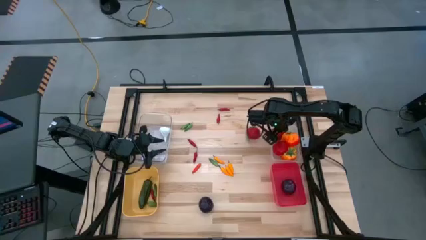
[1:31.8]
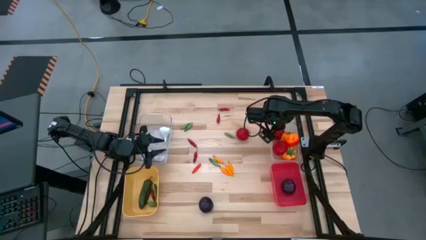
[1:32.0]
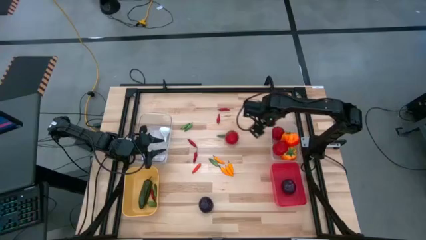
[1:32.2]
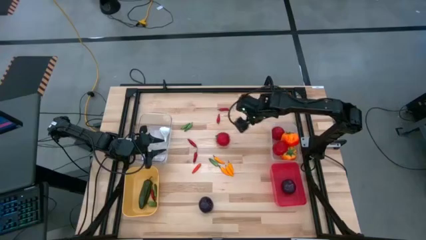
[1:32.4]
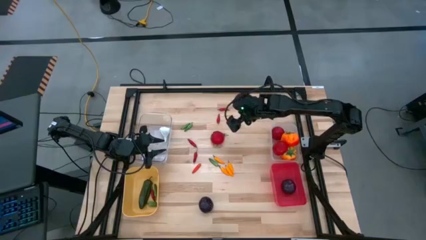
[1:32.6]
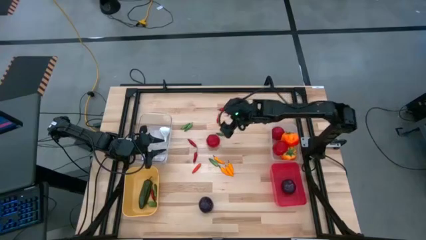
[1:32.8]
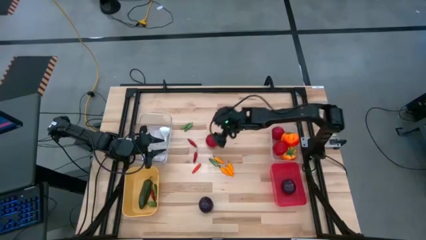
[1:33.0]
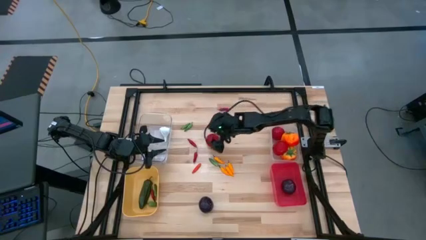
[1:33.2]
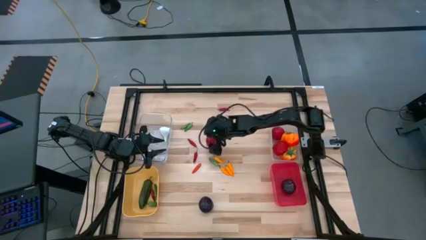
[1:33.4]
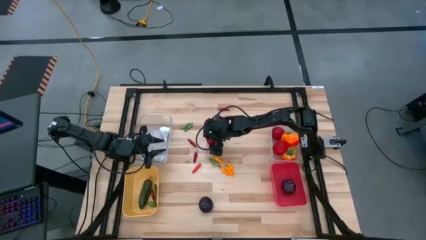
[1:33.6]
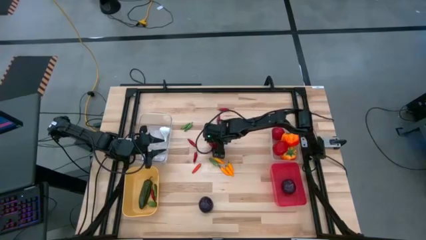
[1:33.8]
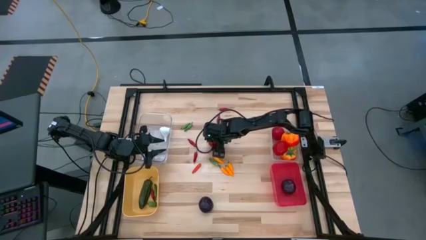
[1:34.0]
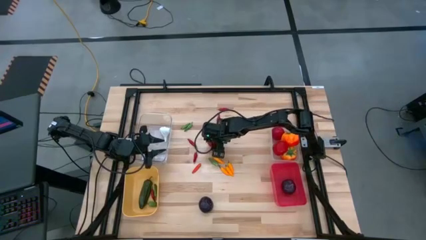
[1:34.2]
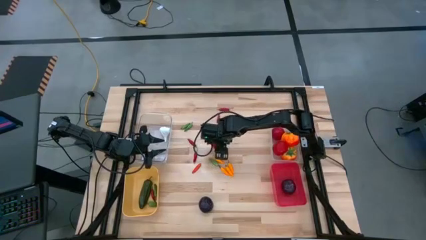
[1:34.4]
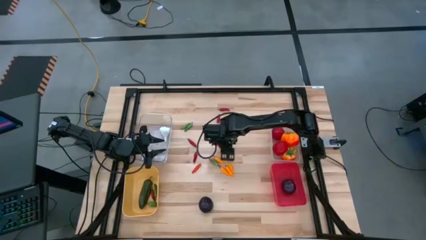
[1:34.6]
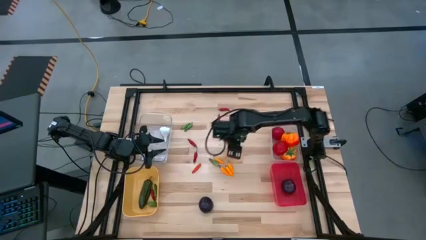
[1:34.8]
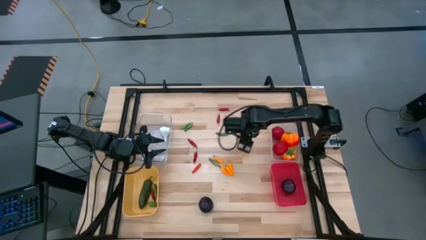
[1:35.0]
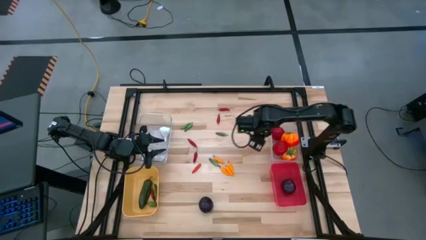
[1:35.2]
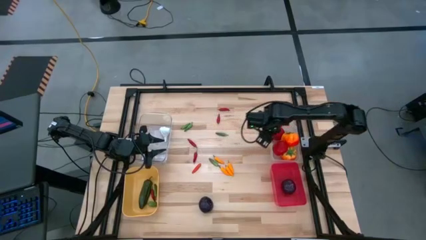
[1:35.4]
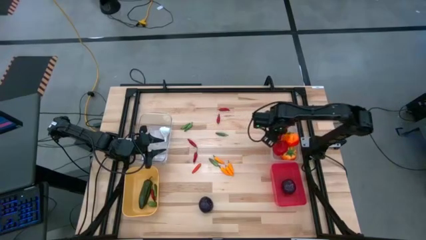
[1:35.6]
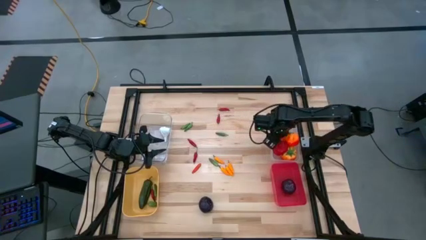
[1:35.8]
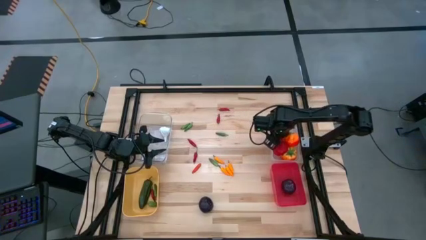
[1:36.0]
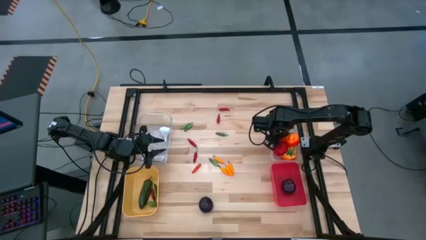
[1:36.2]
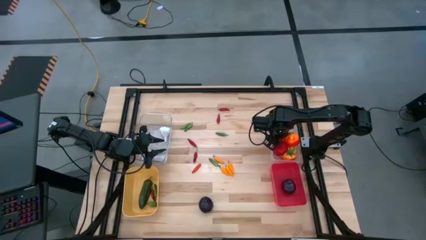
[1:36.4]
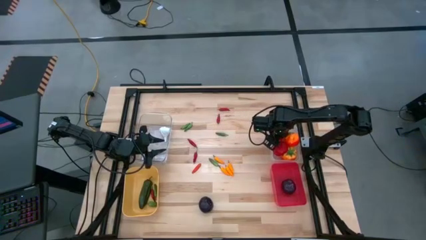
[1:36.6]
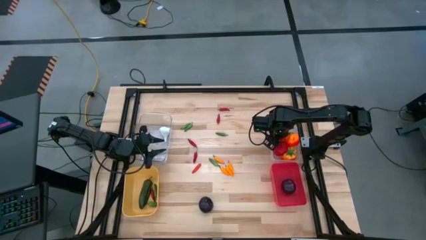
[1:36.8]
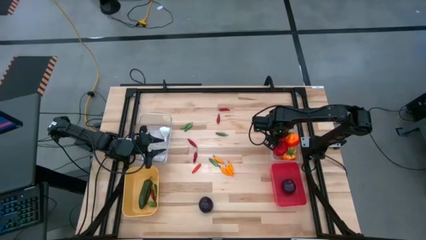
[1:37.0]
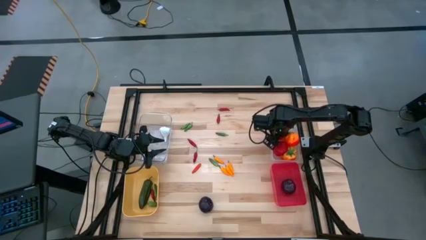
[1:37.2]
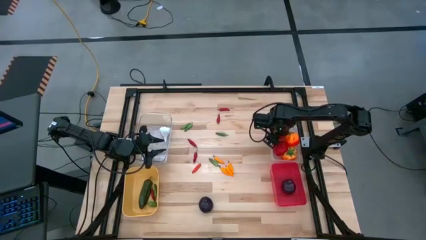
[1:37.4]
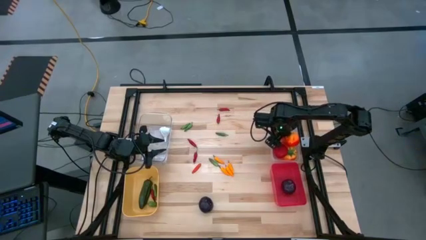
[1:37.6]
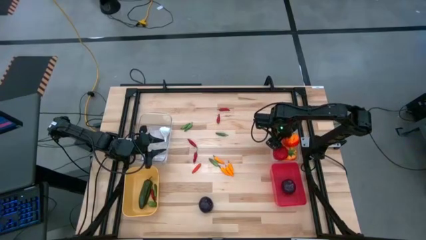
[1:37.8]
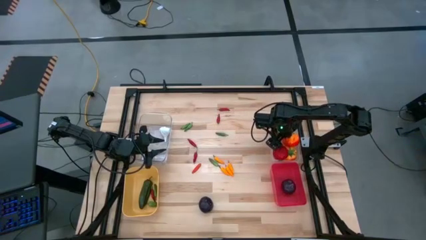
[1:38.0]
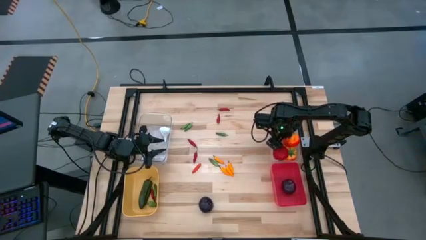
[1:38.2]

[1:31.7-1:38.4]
Task: Sort produce into baskets
Put the red tomato into the right transparent bin

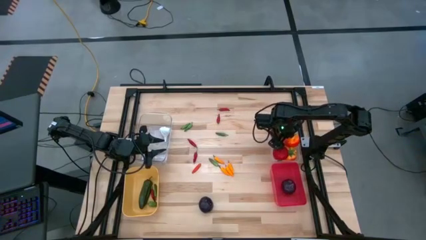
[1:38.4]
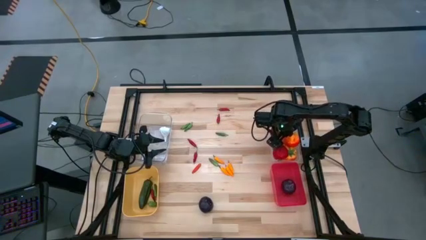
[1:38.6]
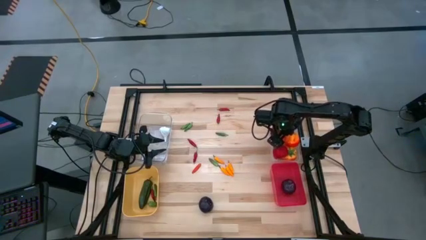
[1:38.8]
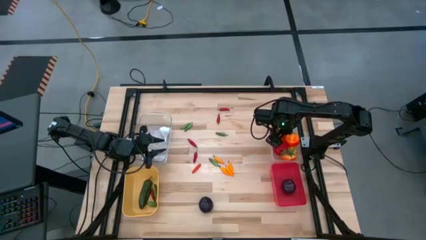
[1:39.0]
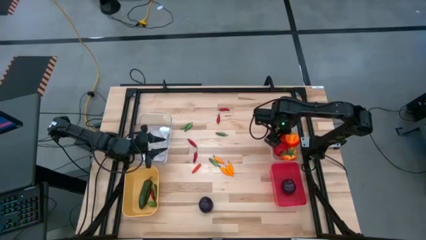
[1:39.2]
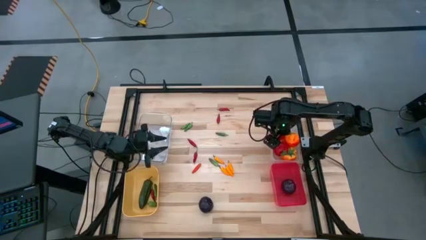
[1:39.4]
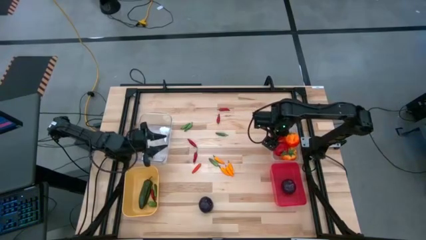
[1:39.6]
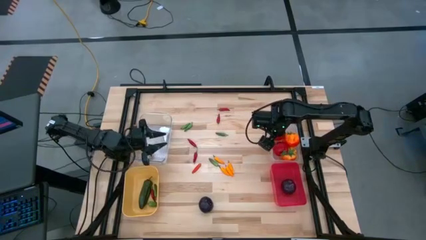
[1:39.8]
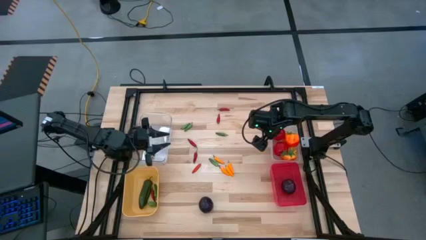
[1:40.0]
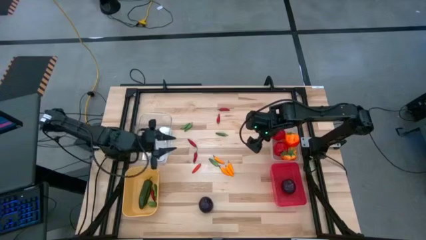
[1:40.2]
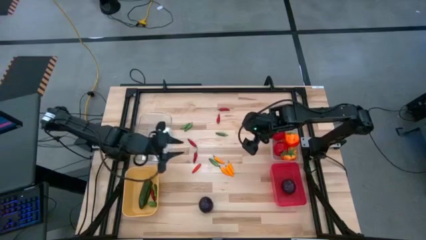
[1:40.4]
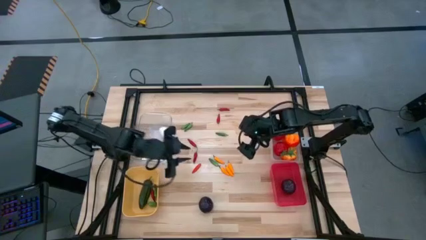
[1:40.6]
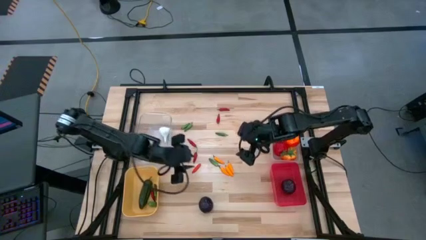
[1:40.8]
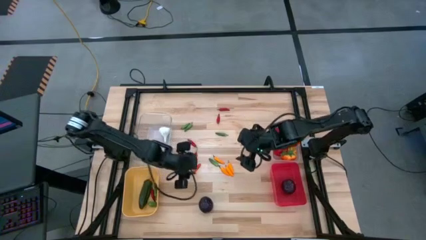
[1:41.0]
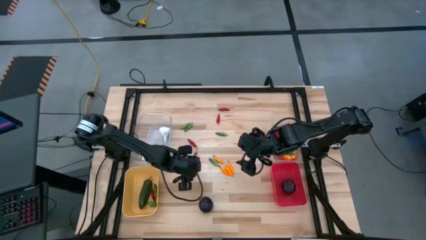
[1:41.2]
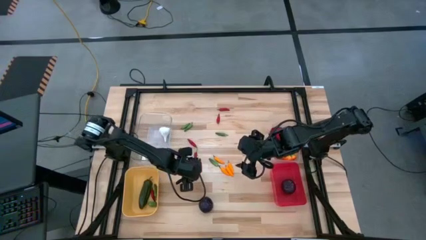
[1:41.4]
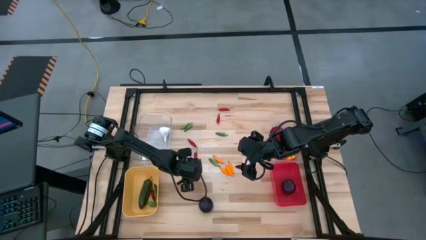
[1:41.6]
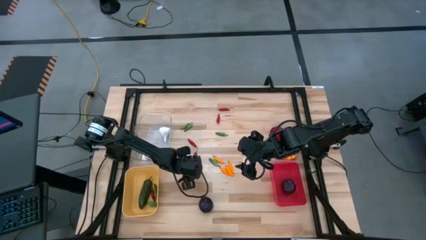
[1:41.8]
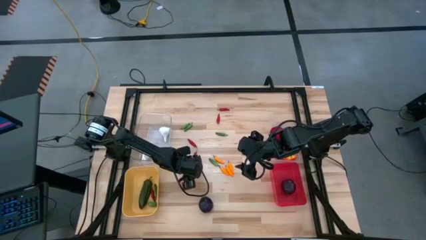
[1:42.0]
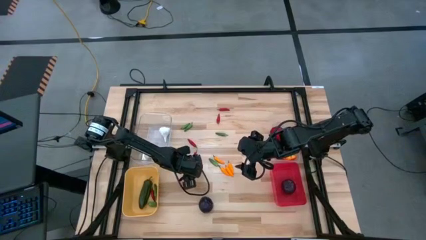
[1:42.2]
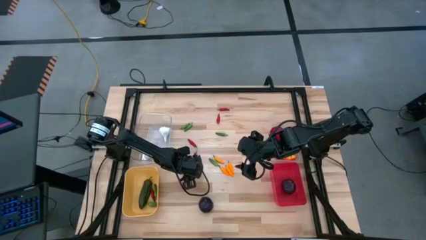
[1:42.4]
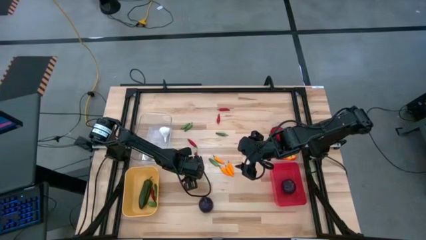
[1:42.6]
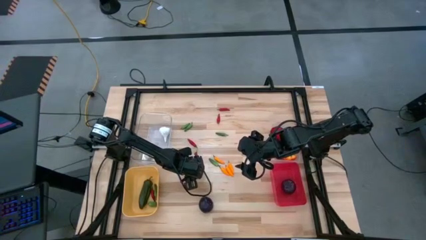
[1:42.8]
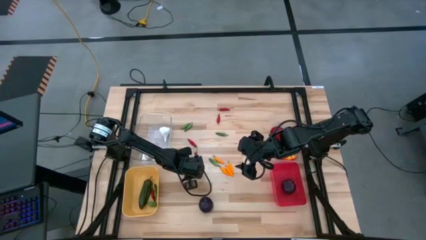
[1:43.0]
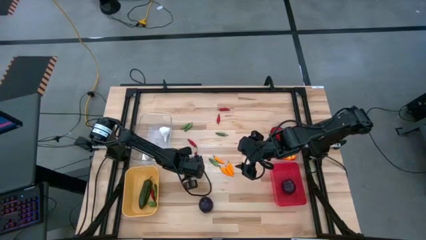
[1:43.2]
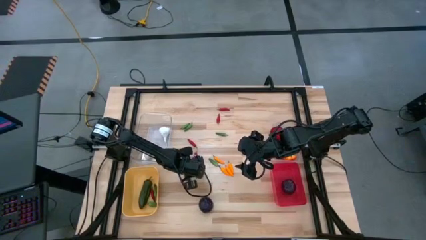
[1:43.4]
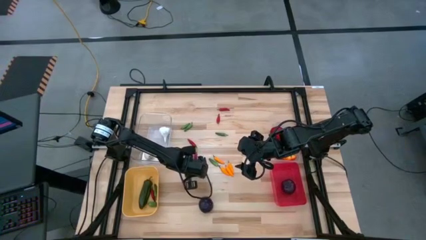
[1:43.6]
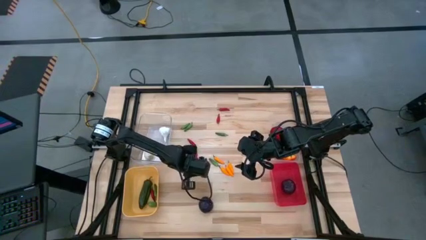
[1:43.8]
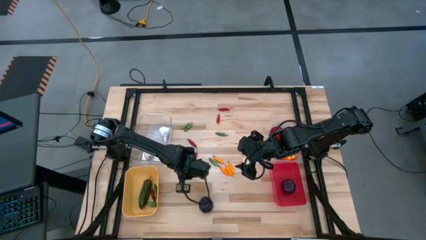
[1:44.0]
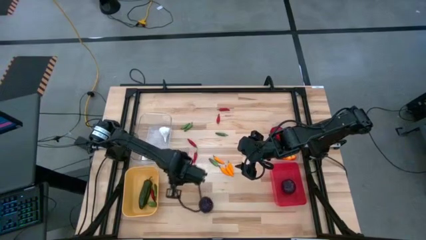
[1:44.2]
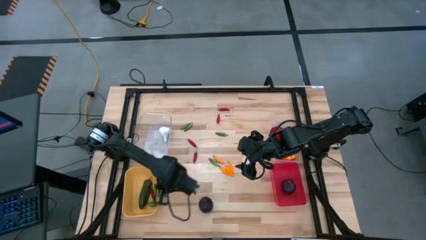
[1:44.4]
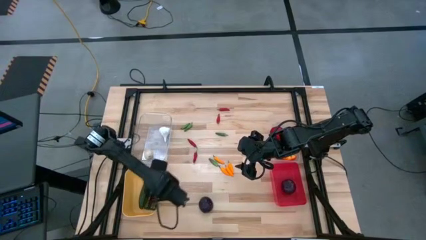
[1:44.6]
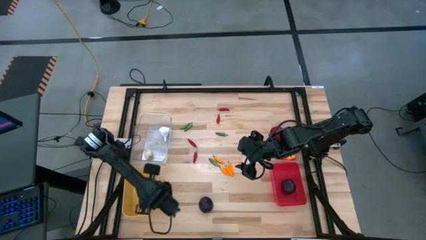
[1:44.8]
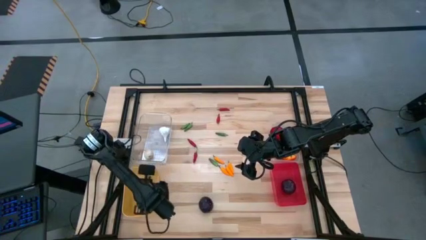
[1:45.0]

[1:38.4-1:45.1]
Put the orange chili pepper into the yellow bin

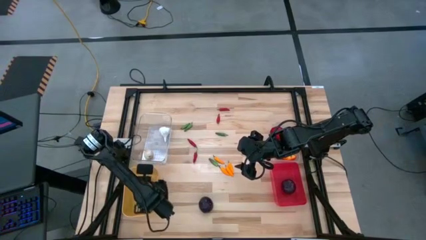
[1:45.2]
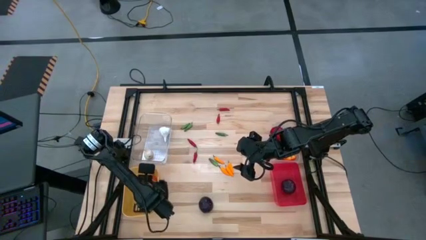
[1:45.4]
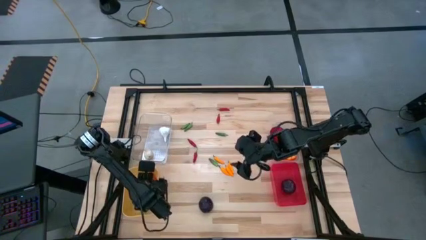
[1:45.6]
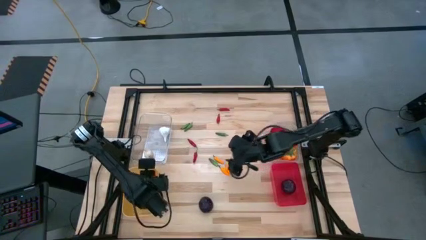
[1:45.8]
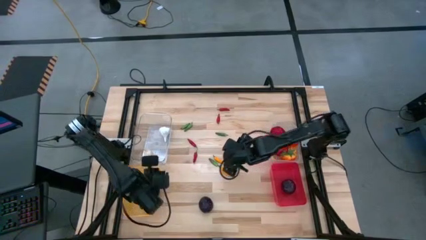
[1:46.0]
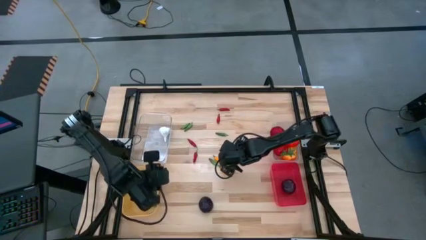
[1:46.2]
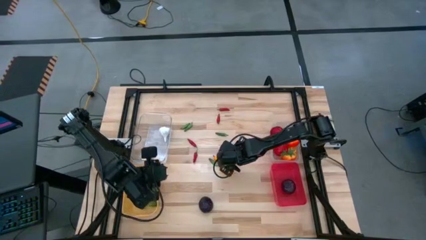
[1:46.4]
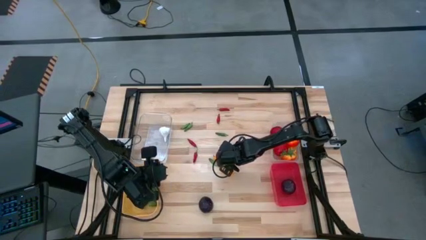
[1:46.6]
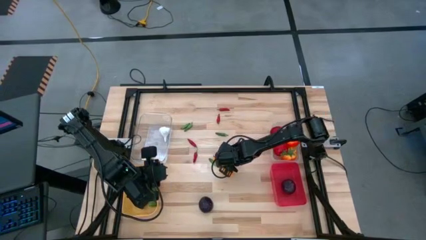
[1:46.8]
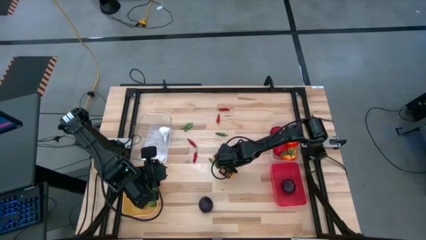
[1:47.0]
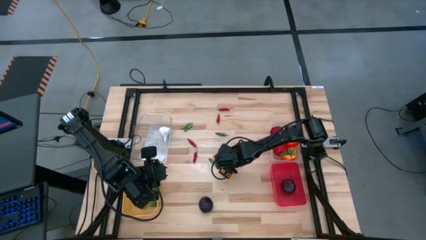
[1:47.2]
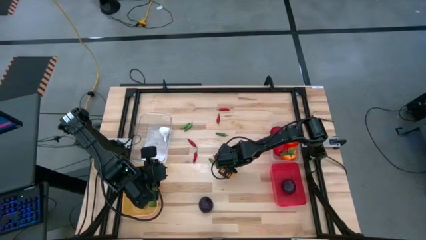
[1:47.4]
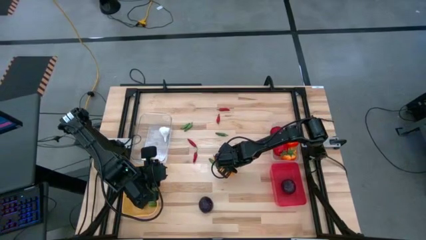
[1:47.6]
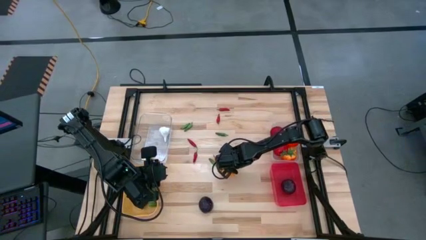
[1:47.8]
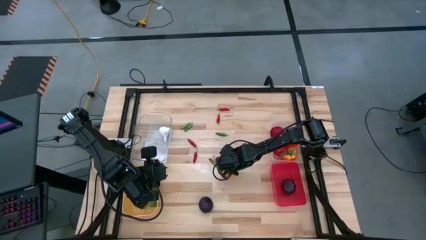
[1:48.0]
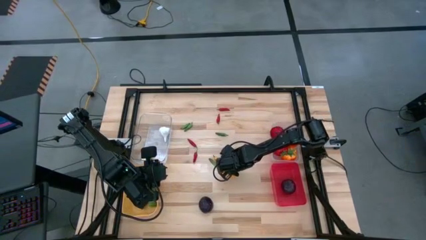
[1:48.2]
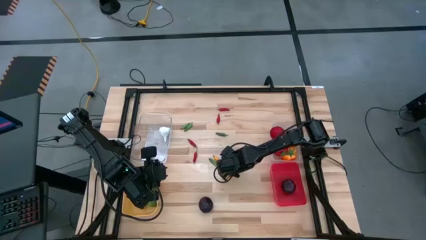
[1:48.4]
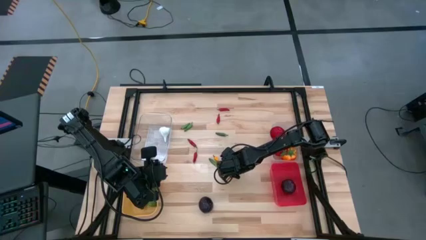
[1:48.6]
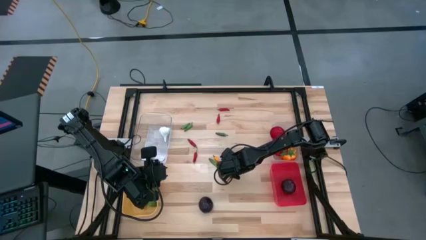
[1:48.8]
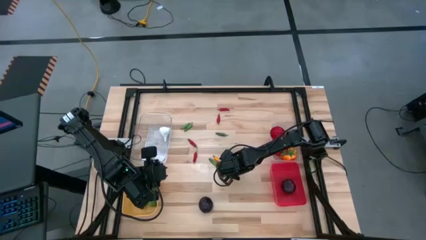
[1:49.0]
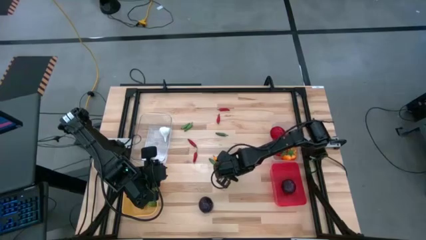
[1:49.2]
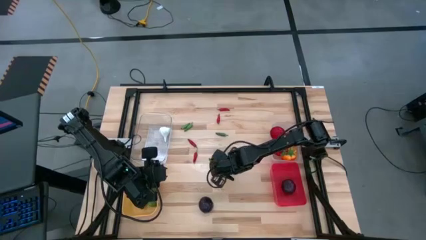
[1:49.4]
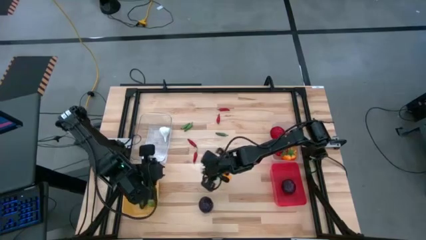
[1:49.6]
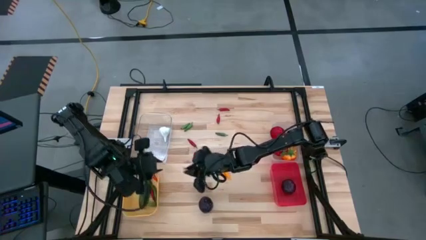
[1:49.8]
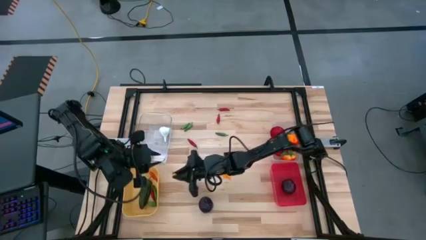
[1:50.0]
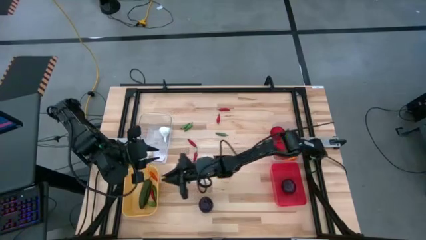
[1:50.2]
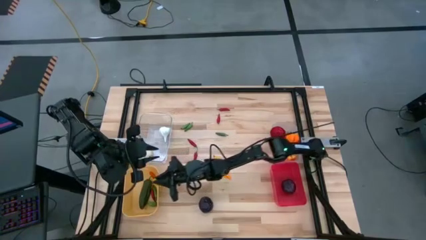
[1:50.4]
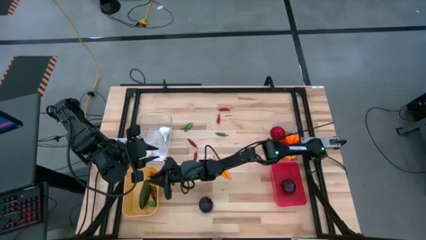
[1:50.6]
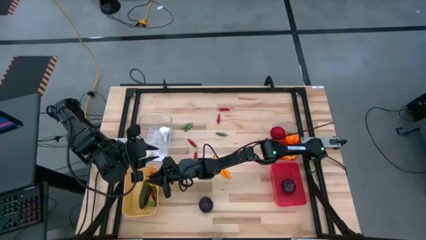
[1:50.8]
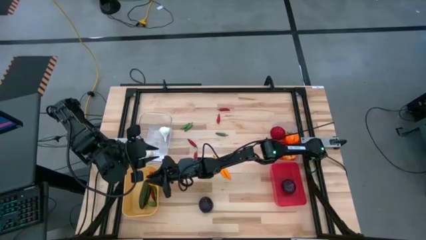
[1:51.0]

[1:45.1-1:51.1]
Put the yellow chili pepper into the yellow bin
